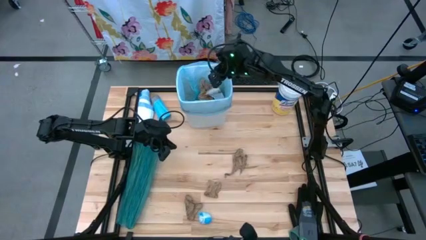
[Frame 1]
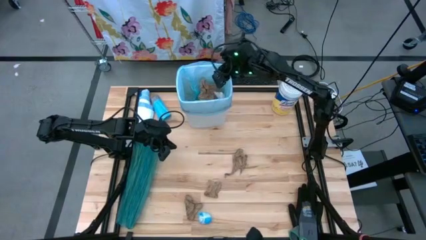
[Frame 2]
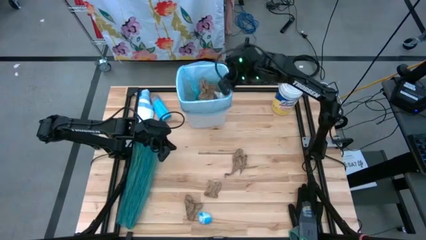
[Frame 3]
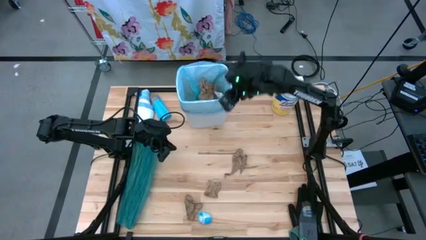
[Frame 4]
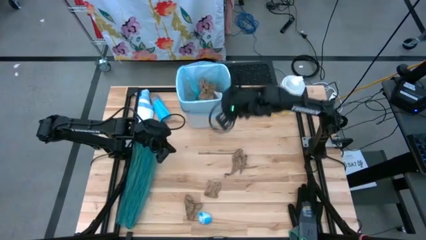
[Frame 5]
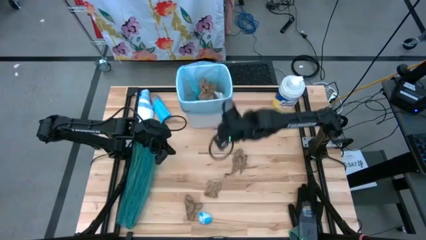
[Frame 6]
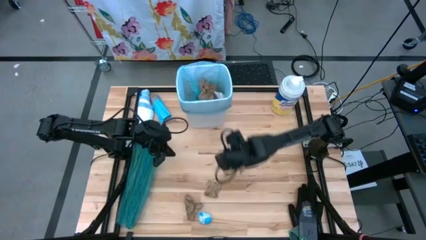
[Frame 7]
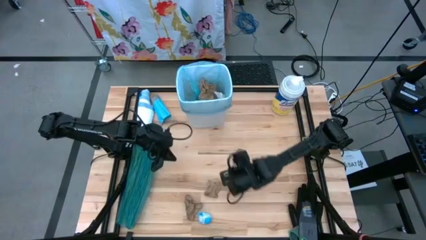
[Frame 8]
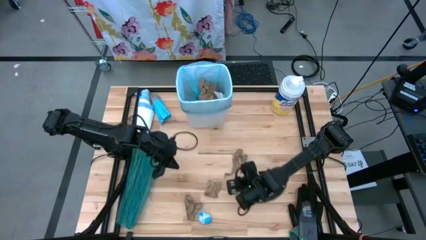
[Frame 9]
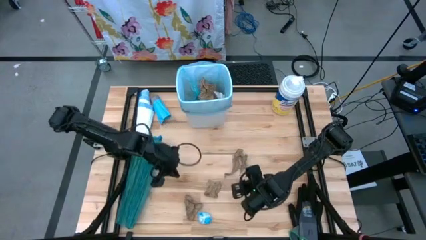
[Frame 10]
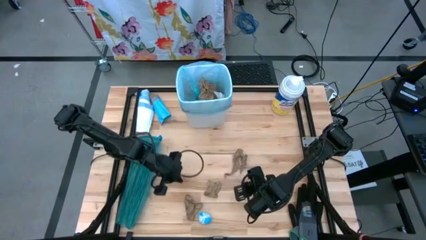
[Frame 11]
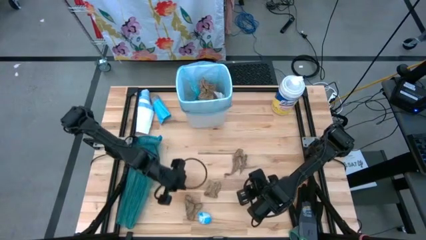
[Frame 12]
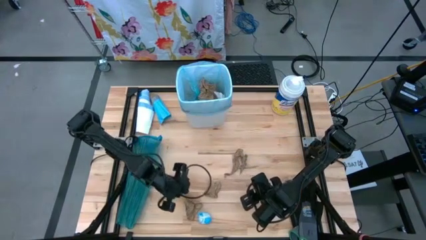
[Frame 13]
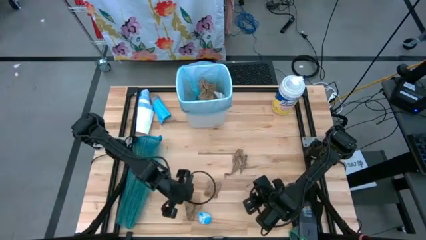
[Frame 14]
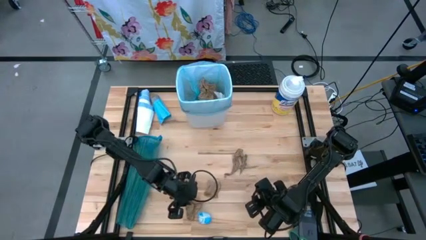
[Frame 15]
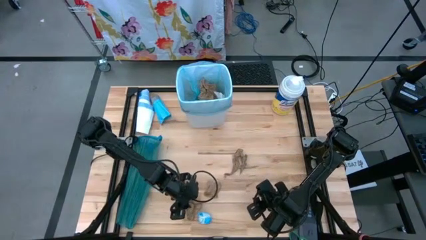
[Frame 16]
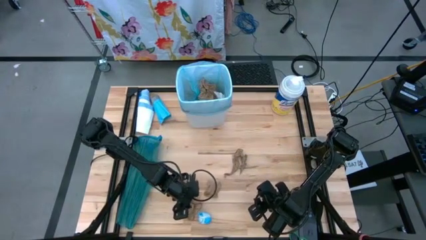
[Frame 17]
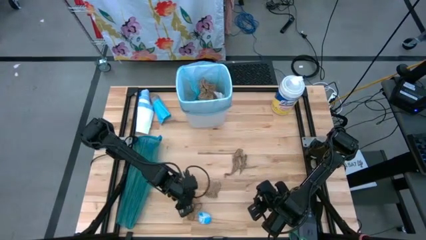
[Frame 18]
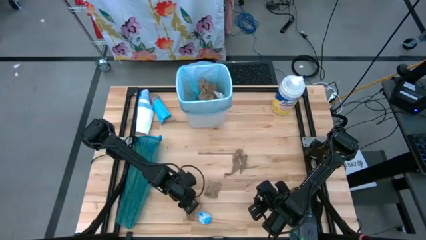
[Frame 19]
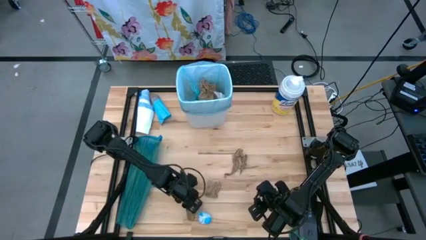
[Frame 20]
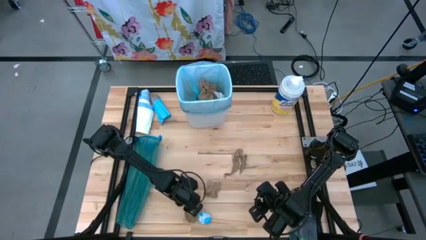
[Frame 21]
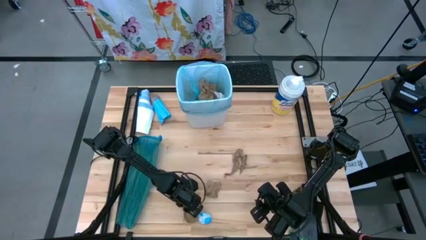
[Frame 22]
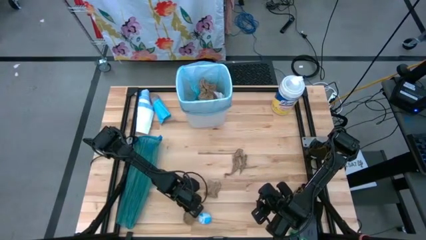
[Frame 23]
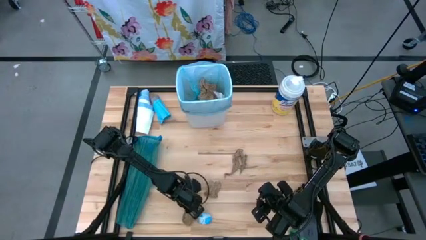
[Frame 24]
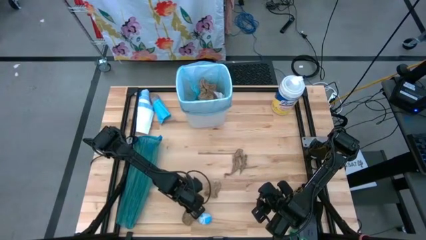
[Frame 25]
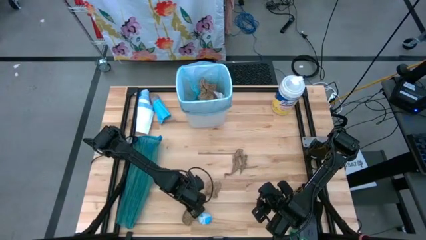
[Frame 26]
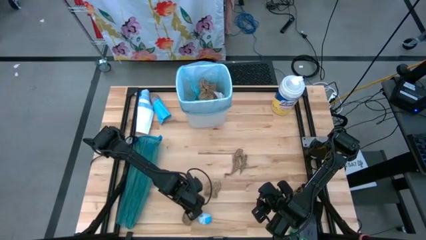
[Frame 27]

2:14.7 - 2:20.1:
Task: place trash/remove bag and relplace
Put the brown napkin into the white trash bin

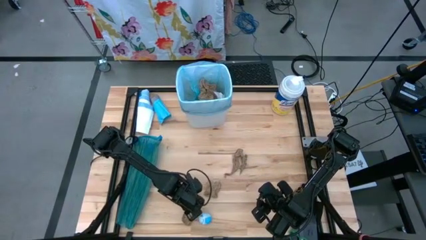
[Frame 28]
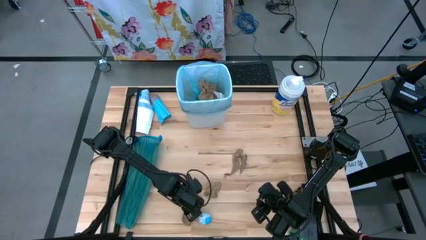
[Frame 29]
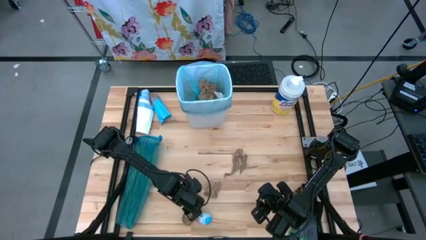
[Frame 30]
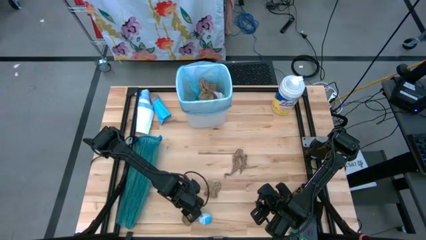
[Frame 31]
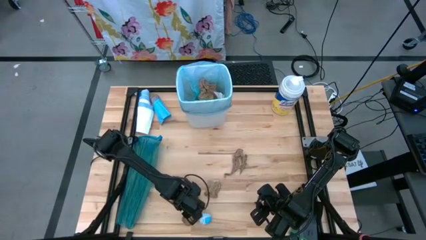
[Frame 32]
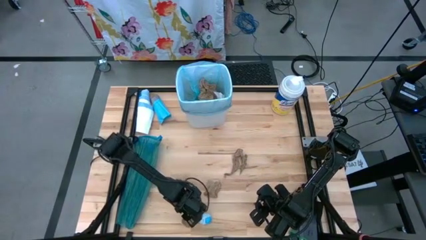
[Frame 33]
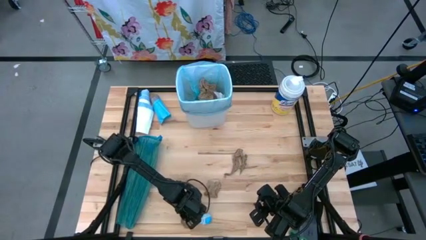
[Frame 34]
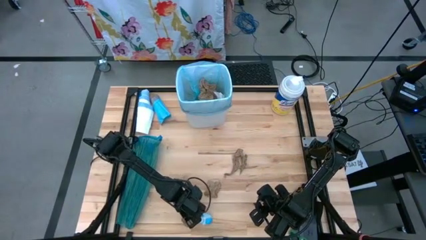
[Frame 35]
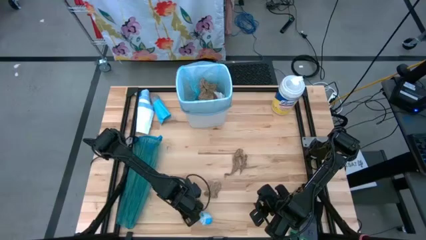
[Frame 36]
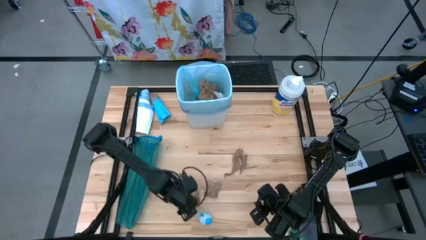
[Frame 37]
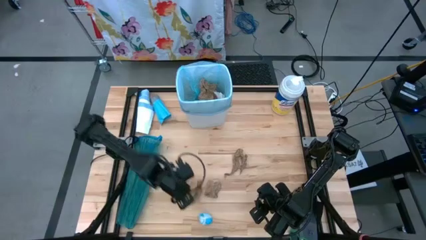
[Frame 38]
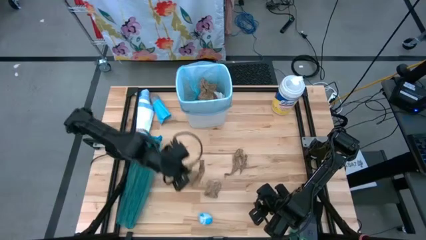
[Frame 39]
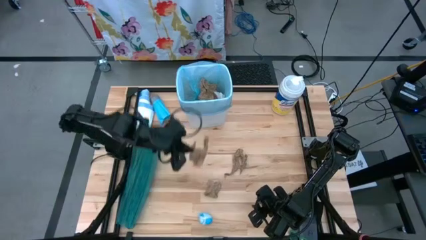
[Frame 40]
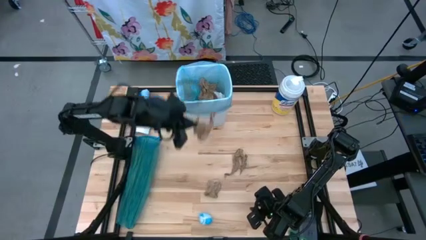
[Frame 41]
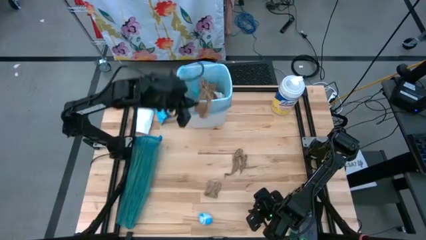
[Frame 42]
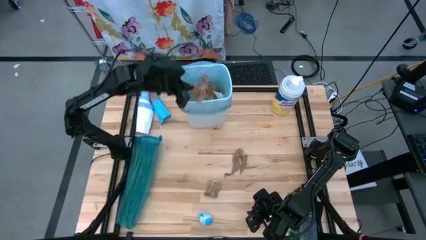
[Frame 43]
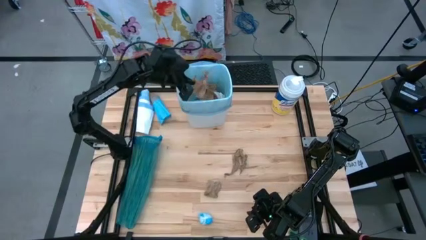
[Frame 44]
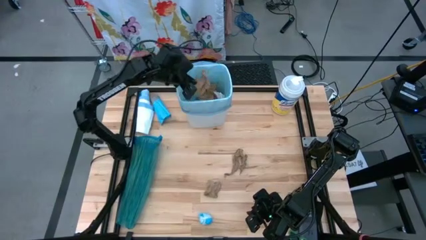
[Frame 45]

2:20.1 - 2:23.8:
Put the brown napkin into the white trash bin

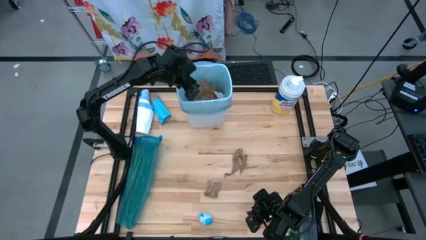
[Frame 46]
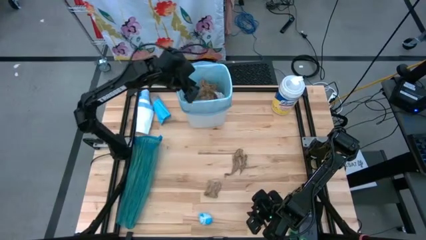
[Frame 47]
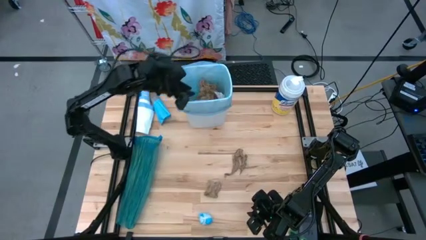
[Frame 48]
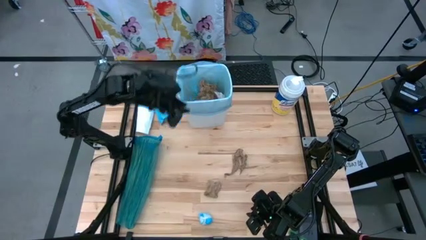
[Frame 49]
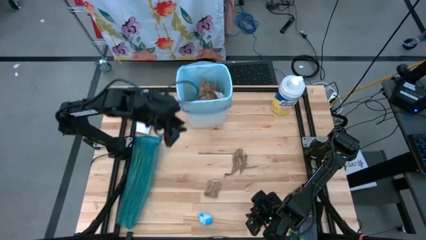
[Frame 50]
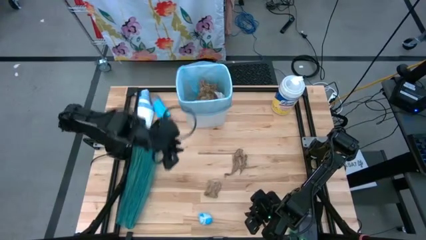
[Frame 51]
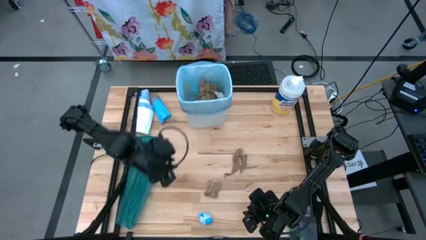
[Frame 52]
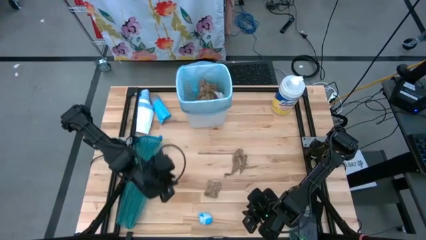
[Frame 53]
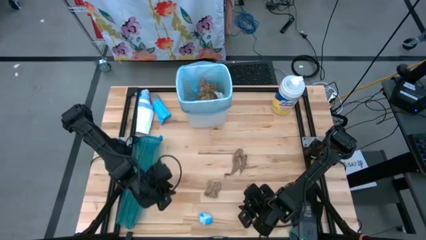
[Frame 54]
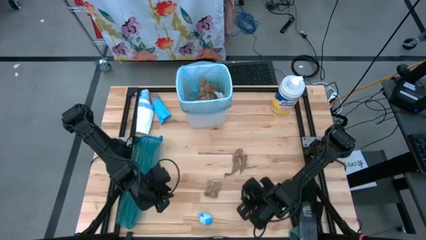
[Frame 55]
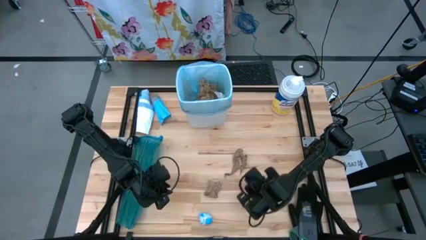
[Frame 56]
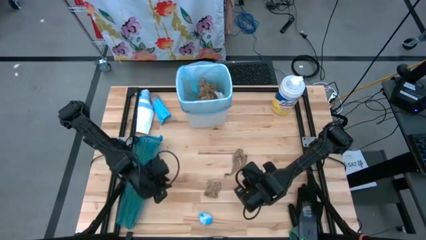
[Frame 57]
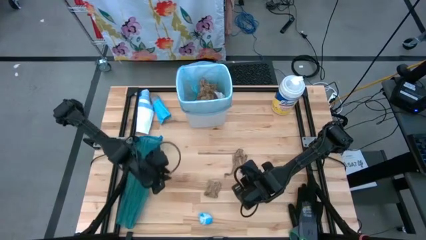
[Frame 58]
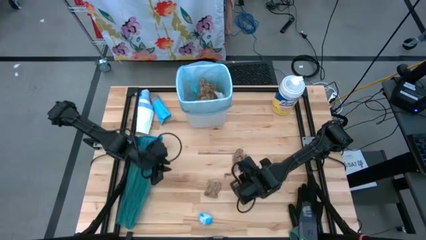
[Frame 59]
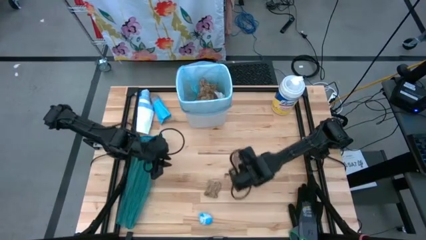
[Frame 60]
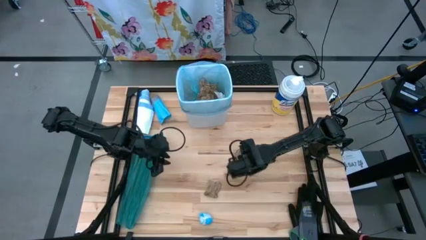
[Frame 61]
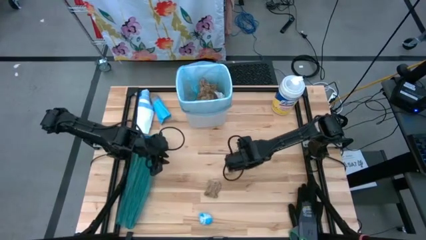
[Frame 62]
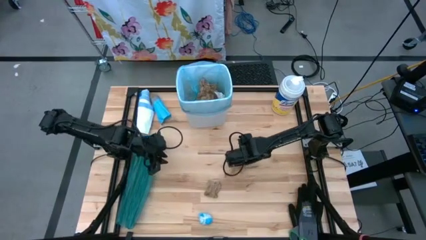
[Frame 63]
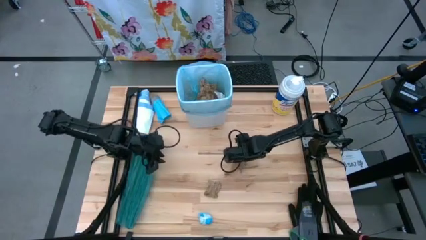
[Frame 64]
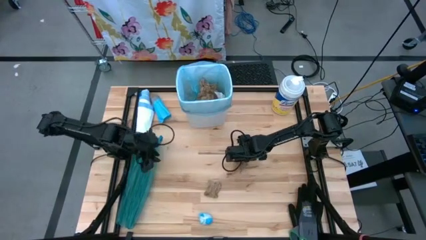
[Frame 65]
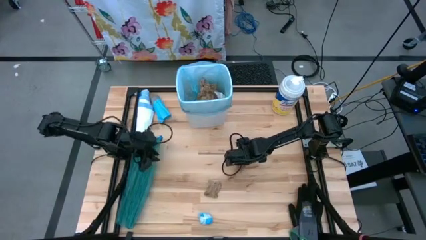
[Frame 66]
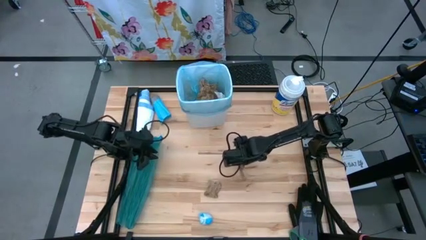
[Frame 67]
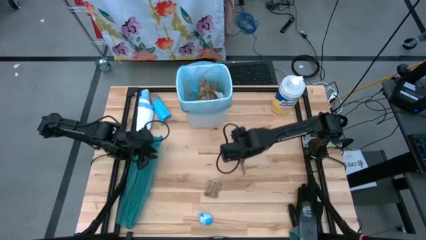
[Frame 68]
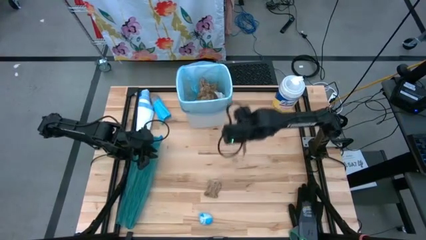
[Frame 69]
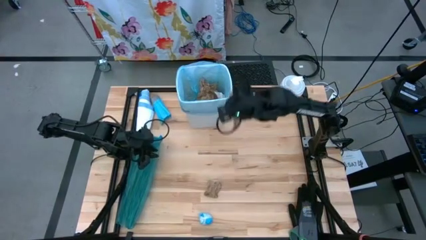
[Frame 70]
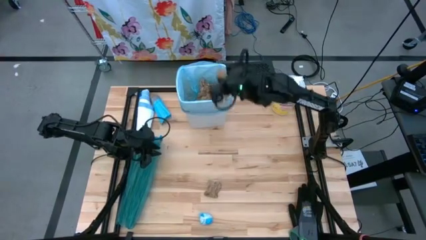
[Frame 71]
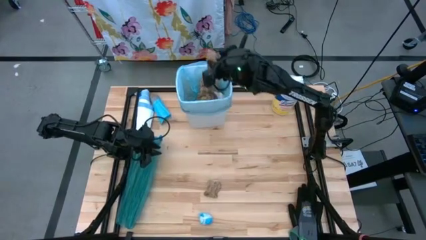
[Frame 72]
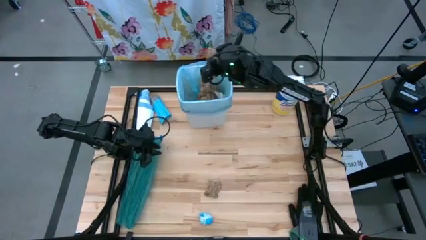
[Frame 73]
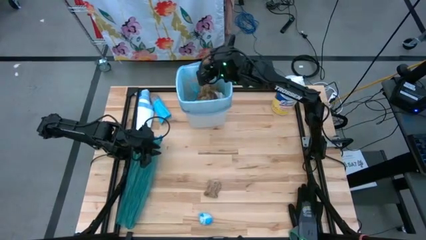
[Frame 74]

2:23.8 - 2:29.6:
Put the brown napkin into the white trash bin

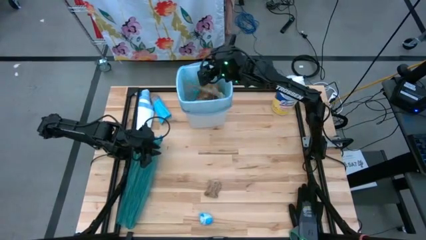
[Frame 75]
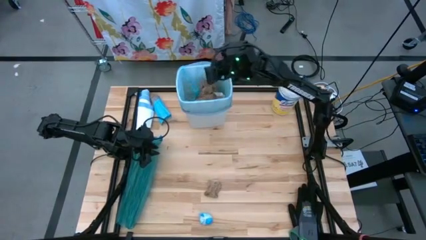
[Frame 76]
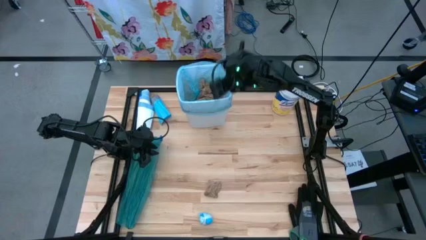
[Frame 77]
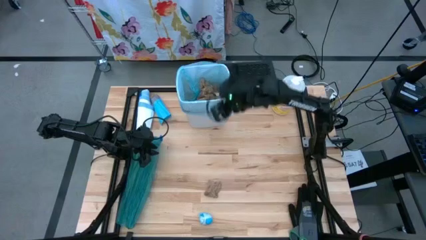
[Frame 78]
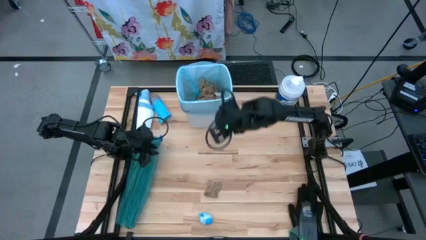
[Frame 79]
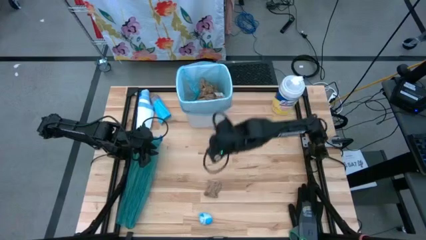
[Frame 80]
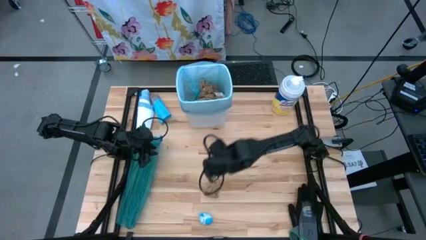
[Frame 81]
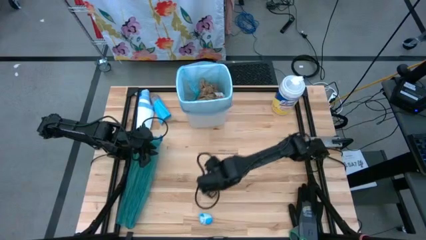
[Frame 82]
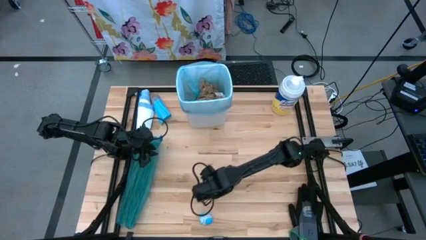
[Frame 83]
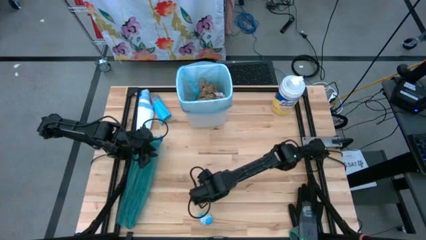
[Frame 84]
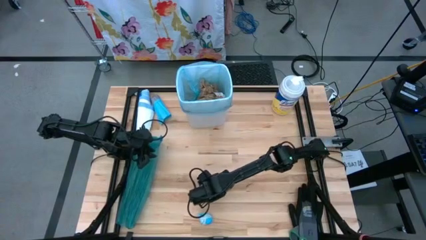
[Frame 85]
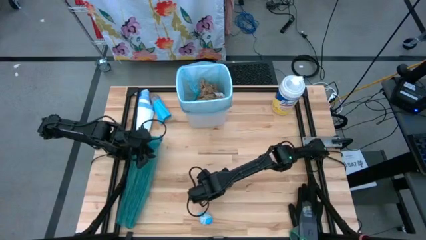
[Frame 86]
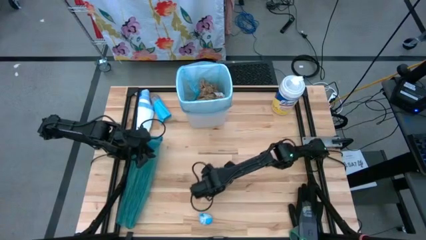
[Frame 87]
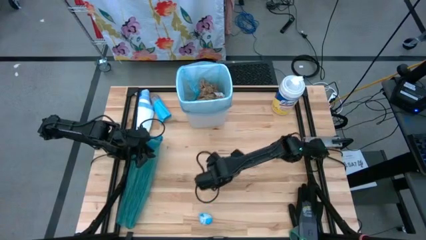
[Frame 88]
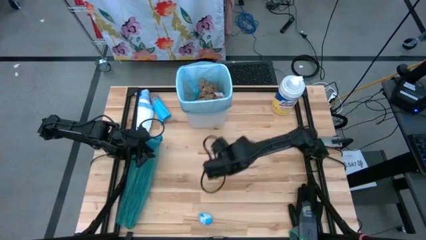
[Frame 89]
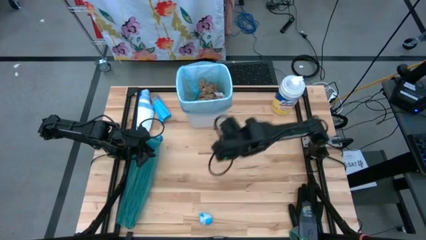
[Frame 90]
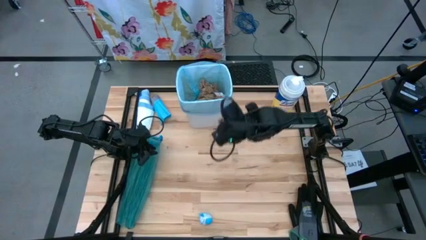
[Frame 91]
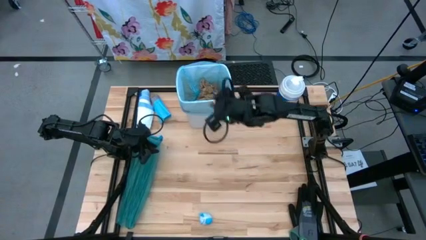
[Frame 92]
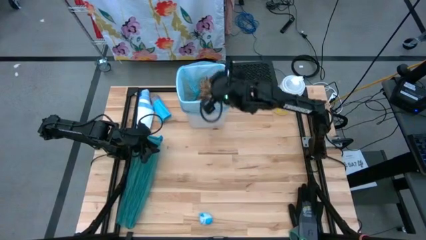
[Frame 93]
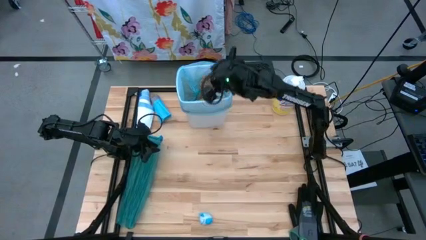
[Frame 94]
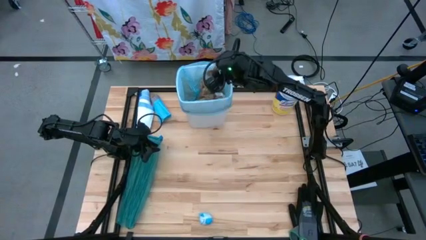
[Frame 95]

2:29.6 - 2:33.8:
Put the brown napkin into the white trash bin
